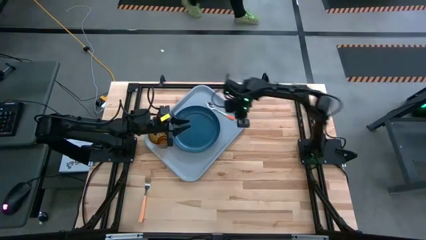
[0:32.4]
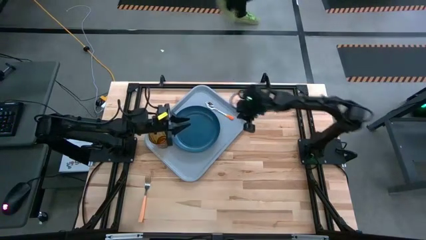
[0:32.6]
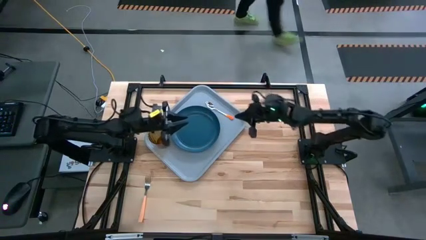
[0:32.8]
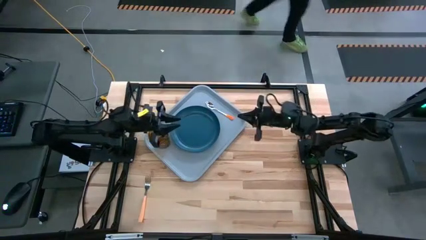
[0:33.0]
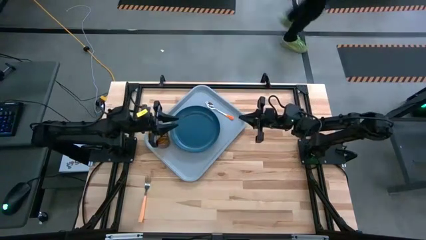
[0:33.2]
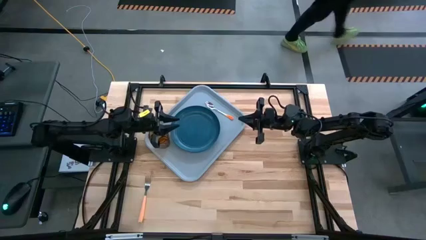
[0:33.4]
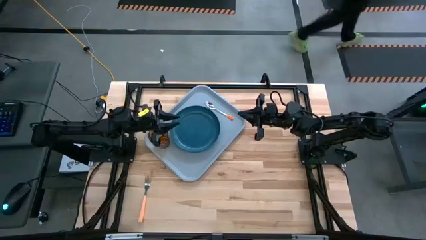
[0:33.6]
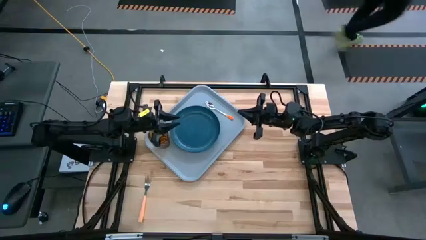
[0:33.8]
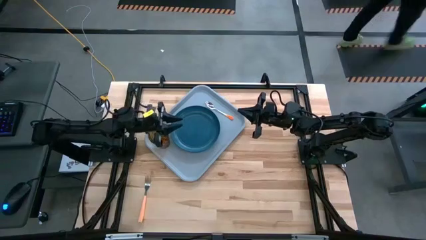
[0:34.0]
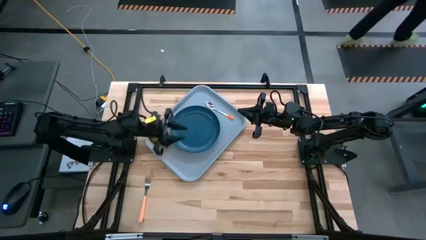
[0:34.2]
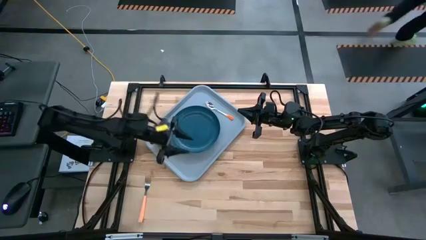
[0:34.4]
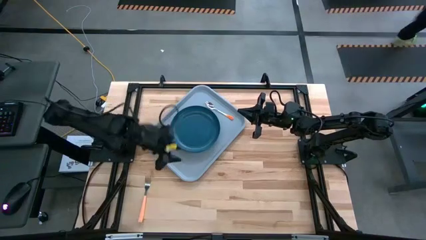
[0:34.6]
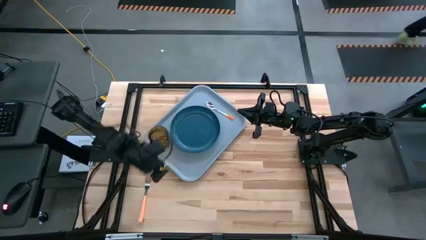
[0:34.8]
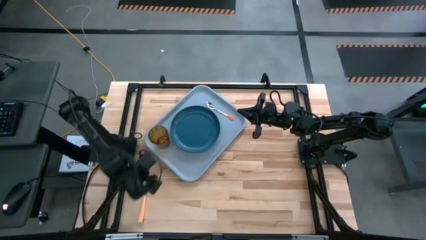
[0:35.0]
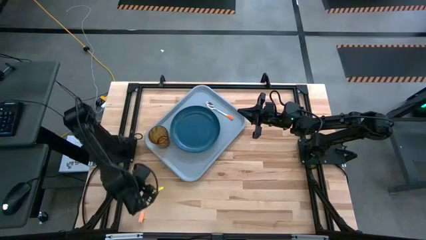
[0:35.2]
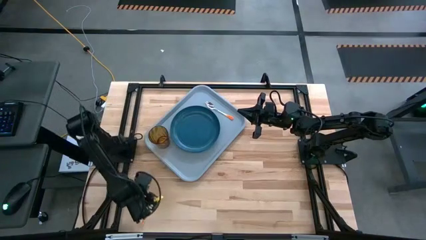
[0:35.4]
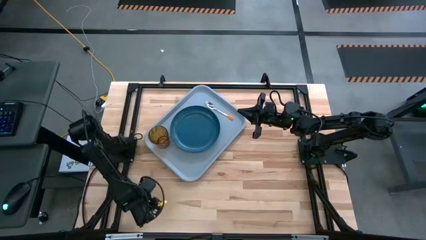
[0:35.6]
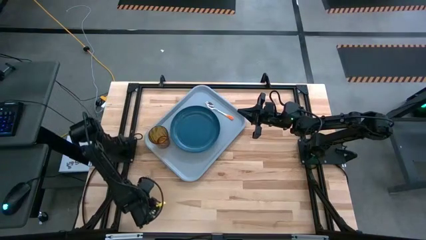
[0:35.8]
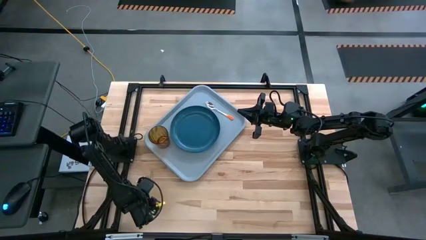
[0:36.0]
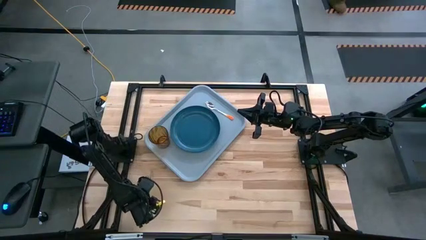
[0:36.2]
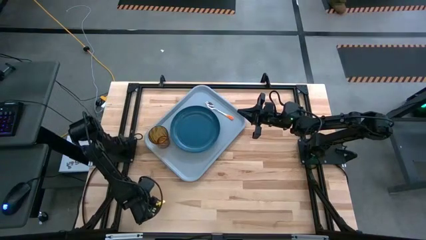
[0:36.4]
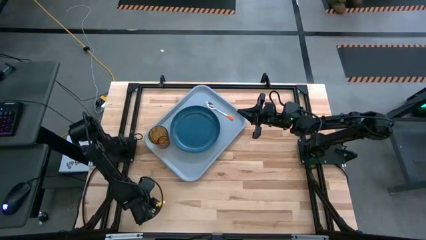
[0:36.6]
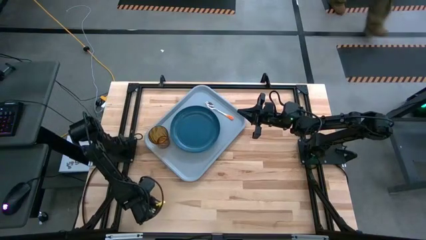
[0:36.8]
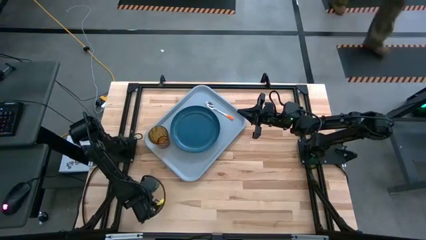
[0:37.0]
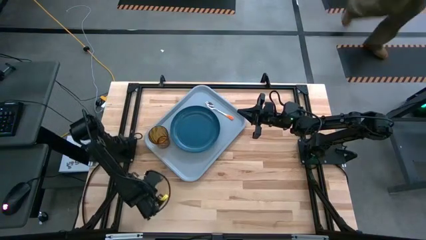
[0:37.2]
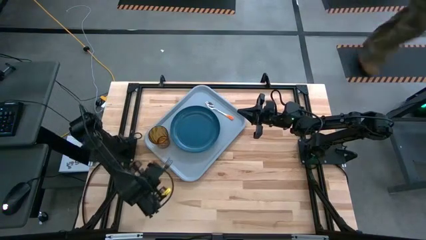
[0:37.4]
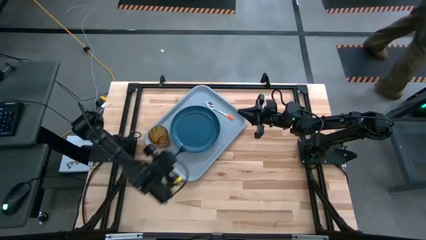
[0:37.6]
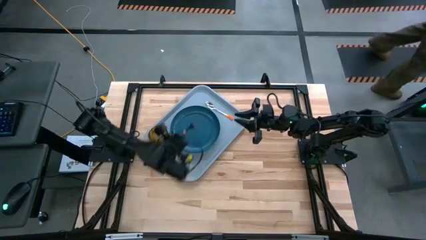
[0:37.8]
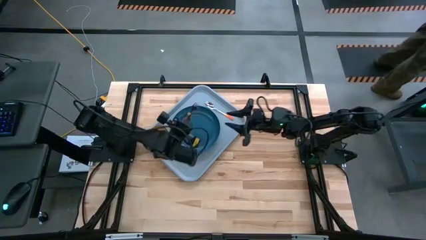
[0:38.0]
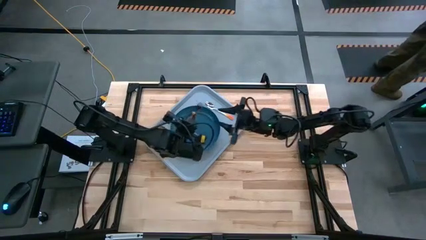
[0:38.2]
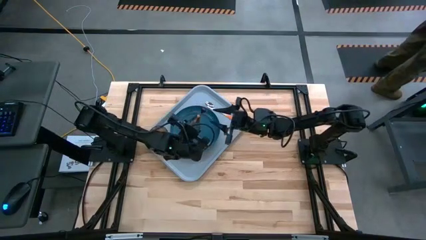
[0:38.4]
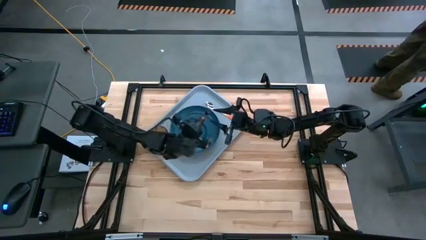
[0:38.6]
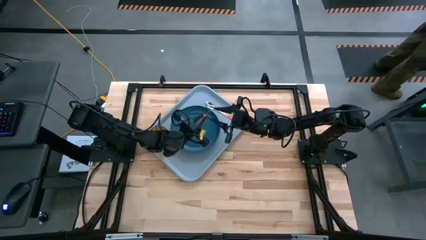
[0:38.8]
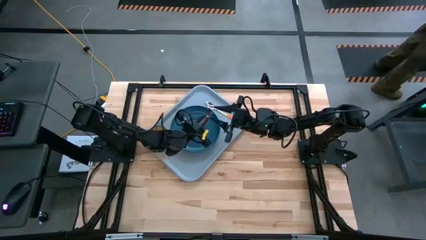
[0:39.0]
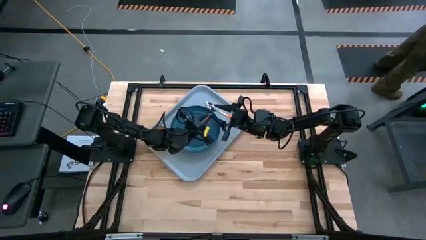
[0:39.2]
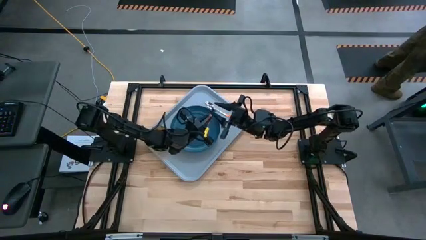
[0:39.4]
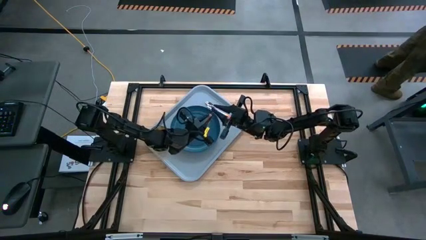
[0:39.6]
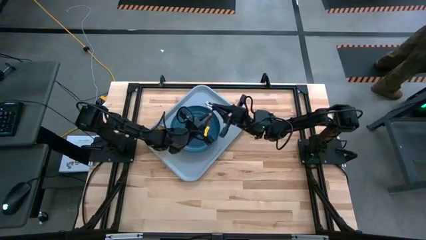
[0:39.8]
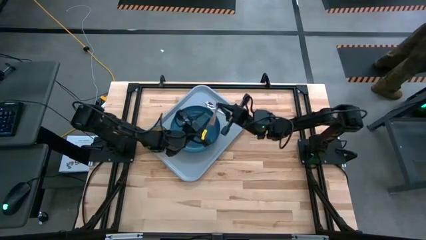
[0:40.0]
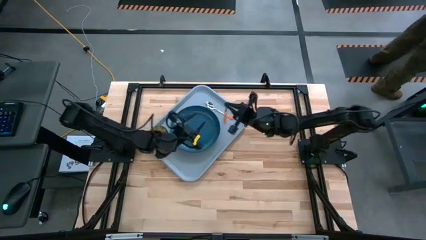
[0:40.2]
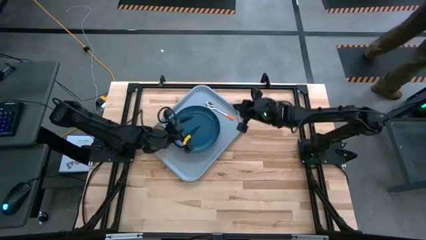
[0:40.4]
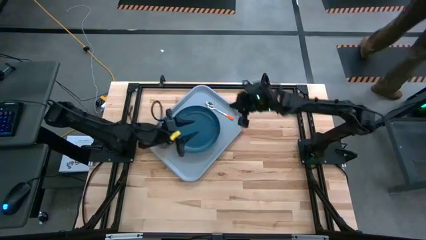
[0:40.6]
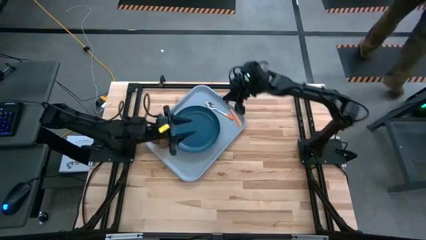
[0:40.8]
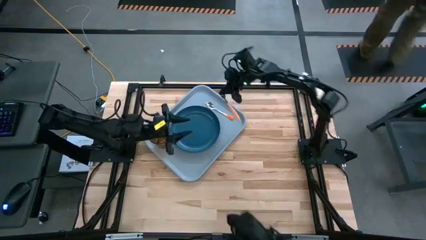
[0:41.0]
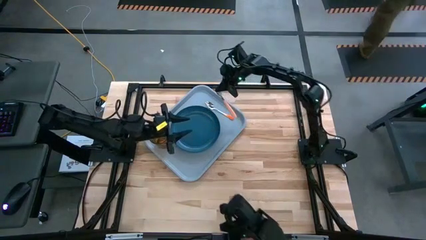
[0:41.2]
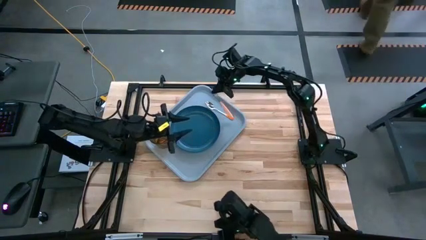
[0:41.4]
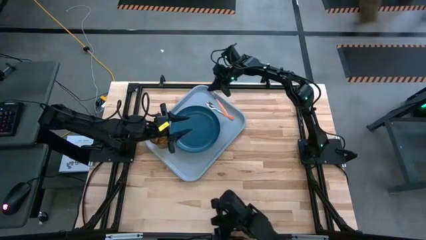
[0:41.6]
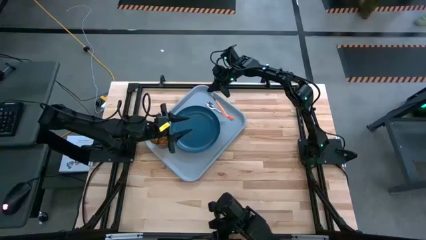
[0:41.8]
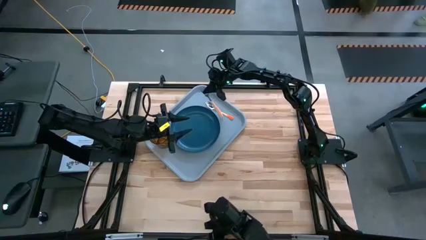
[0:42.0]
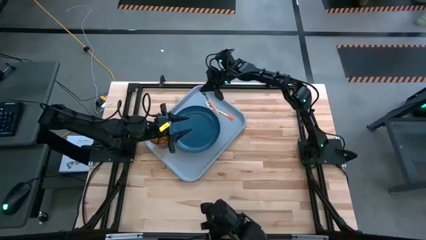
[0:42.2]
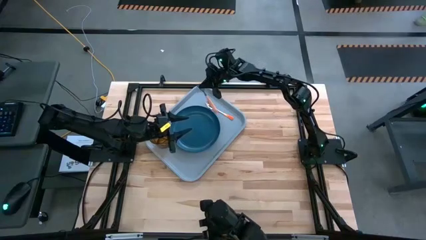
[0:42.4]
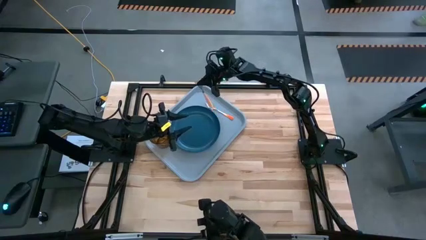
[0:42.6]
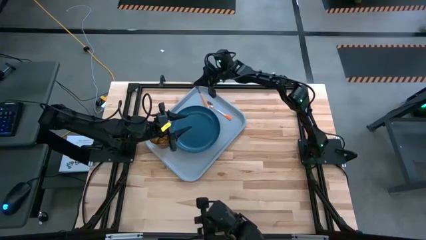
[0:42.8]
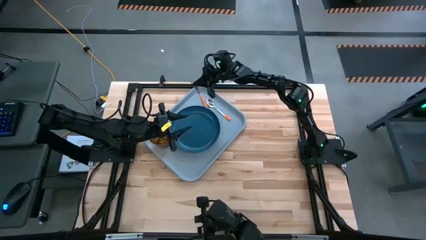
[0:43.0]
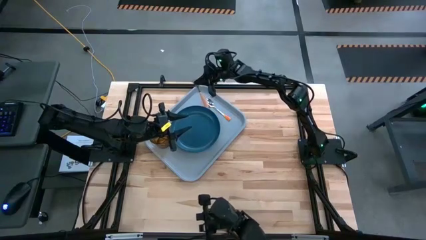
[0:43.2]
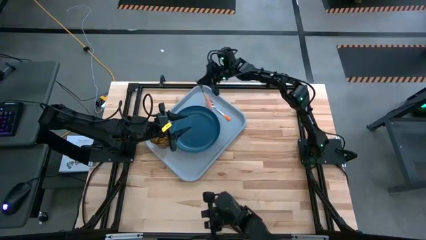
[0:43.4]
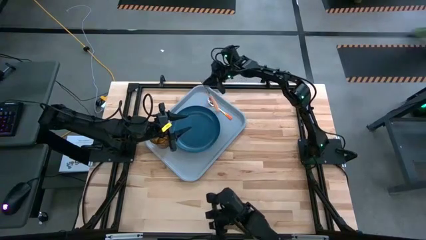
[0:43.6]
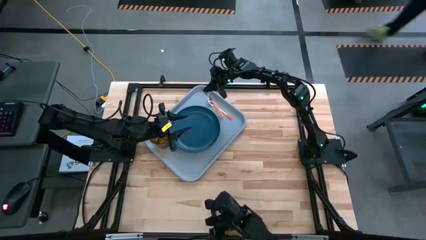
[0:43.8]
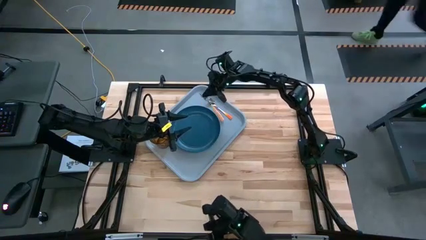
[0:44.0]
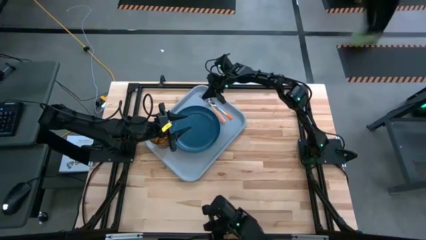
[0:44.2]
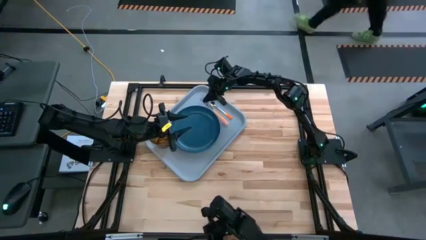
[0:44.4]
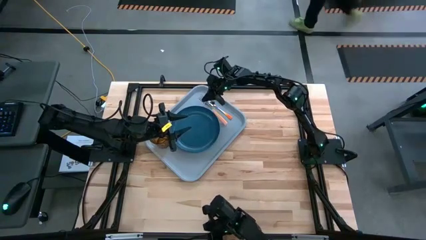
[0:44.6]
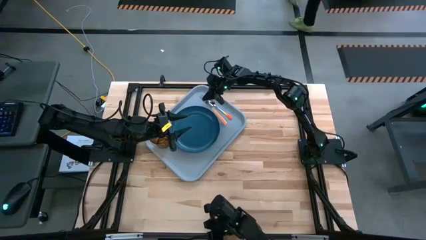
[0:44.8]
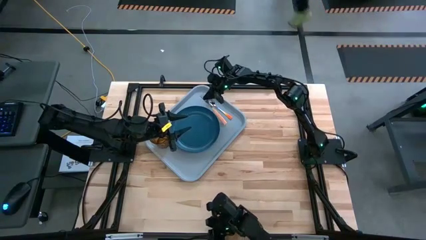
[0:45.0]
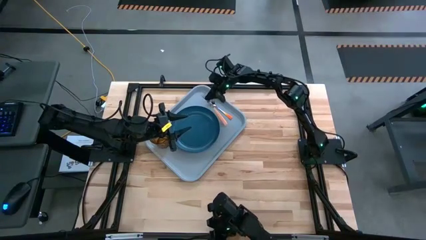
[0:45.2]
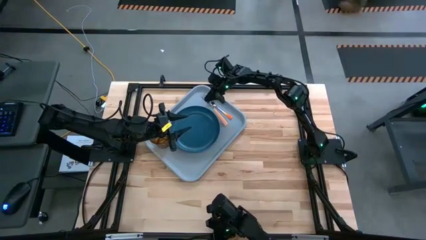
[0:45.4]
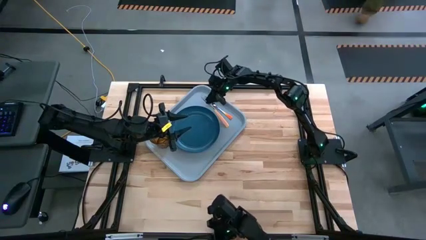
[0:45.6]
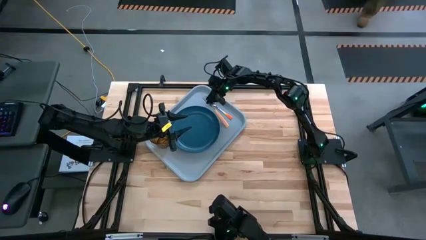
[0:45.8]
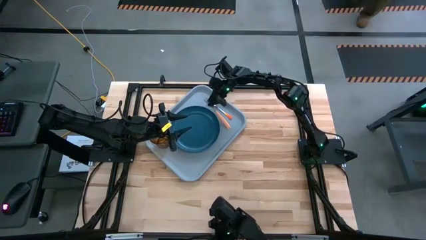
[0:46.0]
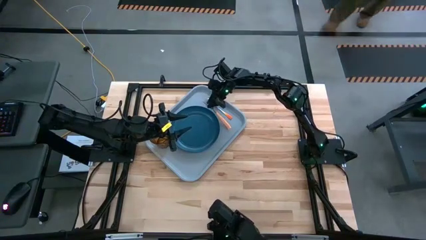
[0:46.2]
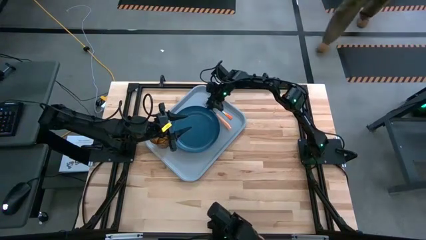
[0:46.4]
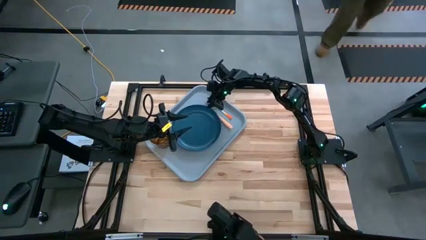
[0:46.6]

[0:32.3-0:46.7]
Task: Pick and place plate/cup/fork/spoon on tray
Put the fork on the tray

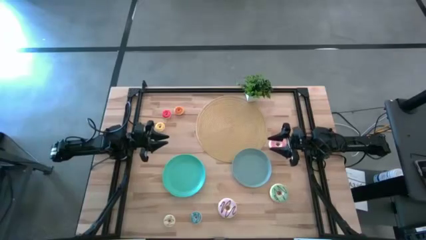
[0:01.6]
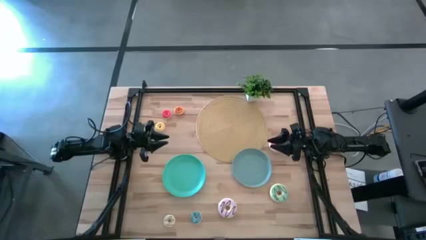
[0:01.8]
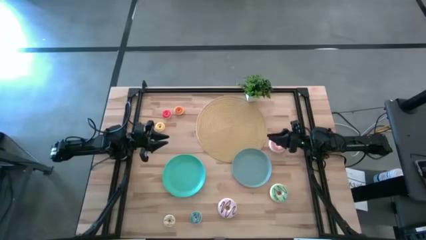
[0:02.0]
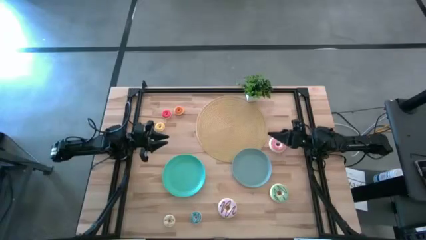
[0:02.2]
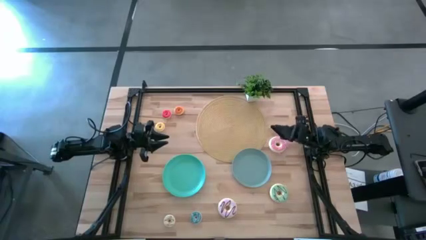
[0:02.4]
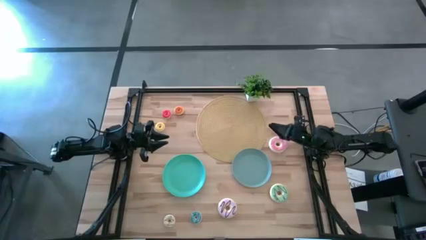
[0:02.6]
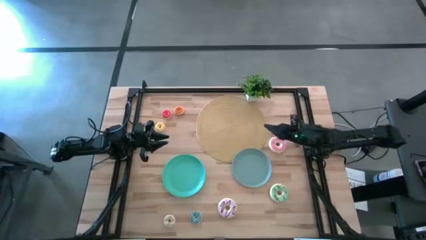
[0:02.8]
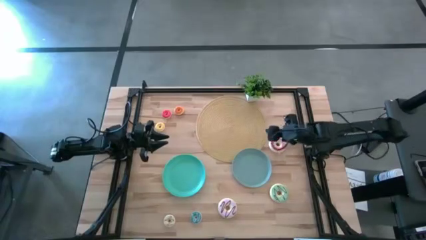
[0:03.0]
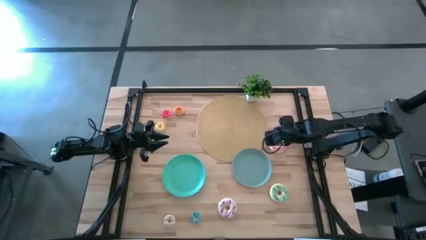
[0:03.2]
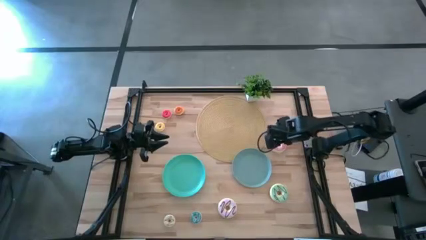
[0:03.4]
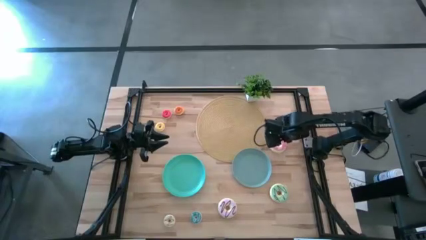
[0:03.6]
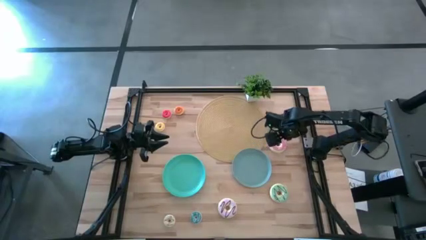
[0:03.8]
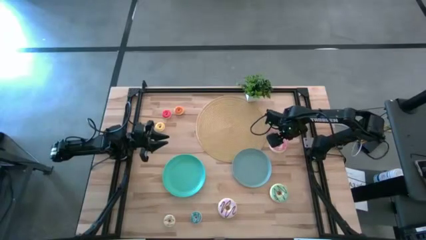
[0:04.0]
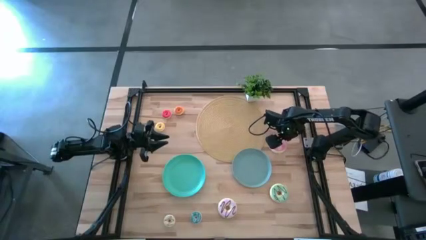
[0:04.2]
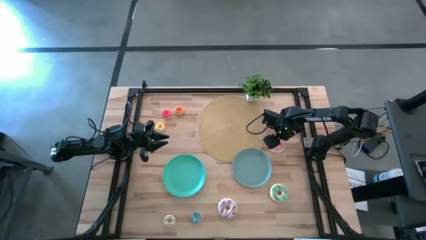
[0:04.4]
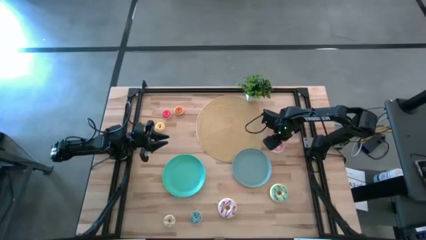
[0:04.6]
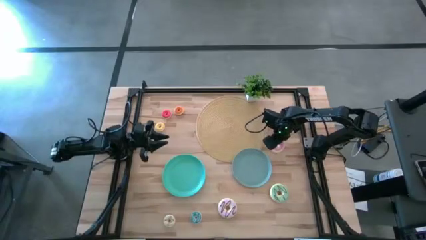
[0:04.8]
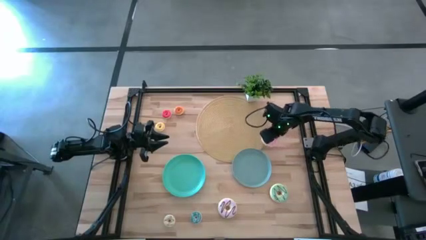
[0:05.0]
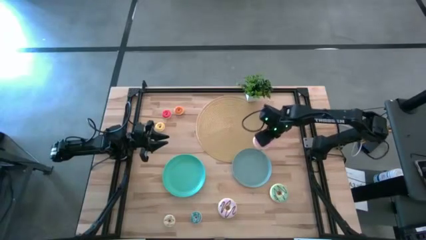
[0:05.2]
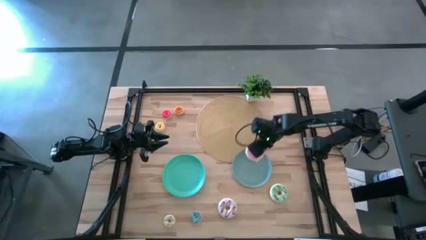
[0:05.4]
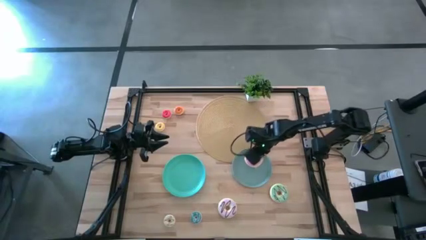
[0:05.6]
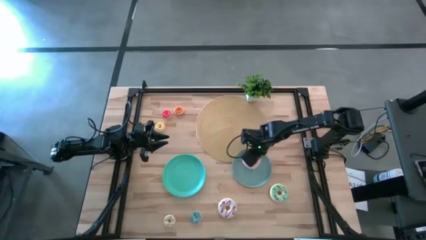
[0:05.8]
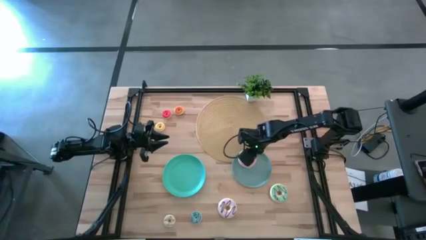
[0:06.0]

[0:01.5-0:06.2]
Task: Pick & Place donuts
Put the large pink donut on the light blue plate
